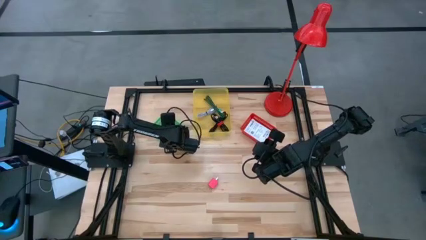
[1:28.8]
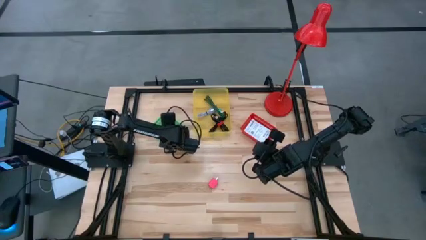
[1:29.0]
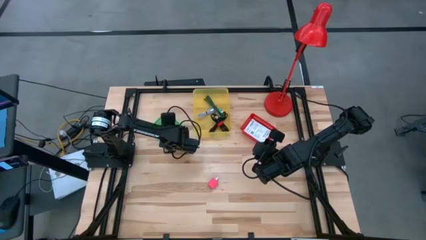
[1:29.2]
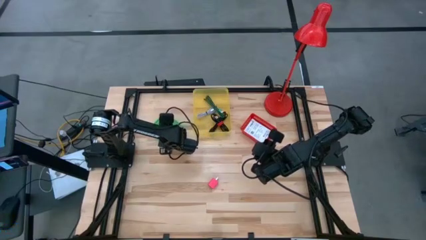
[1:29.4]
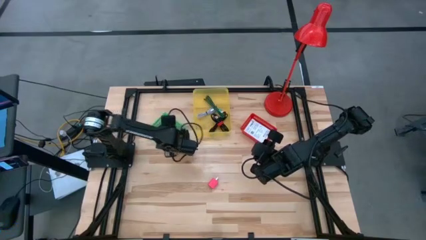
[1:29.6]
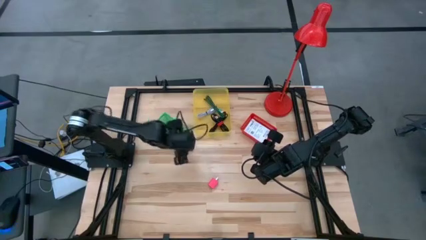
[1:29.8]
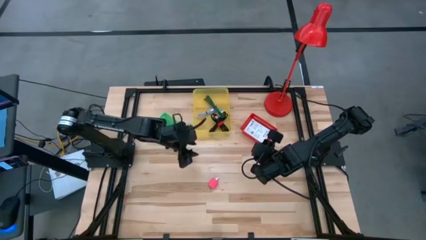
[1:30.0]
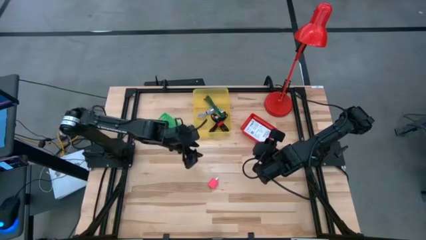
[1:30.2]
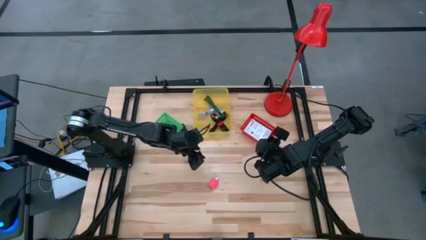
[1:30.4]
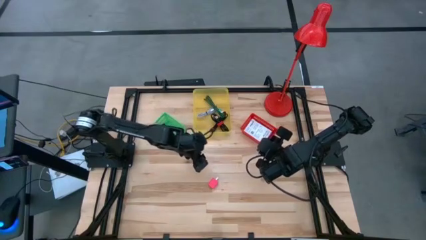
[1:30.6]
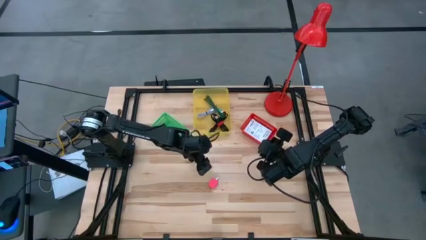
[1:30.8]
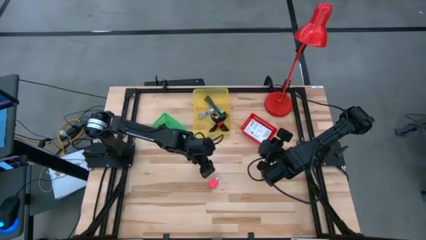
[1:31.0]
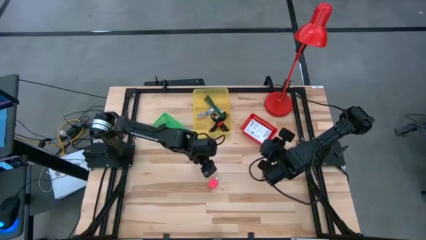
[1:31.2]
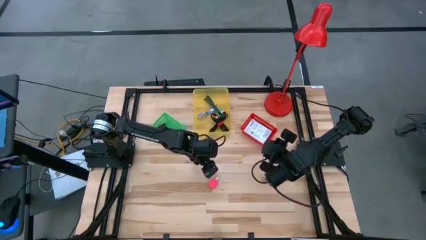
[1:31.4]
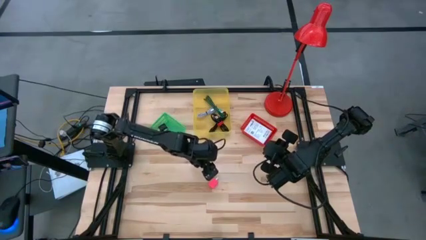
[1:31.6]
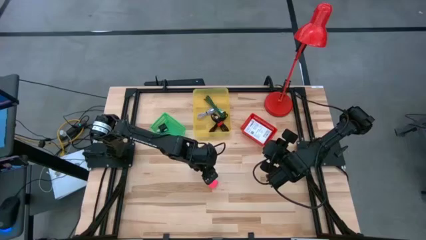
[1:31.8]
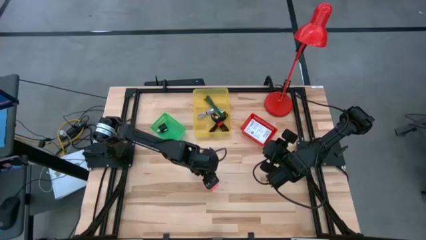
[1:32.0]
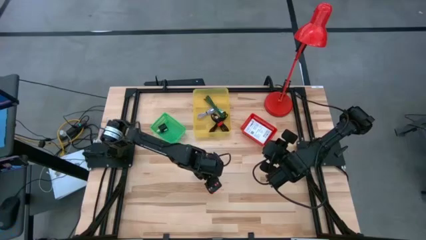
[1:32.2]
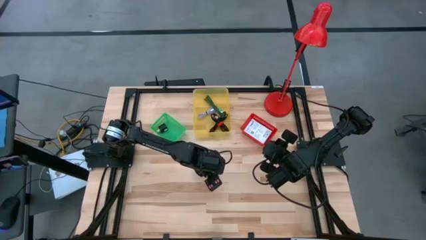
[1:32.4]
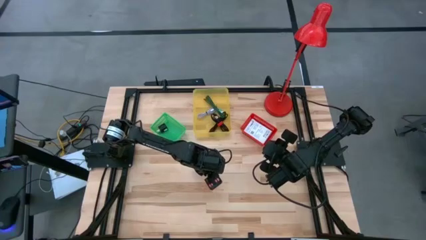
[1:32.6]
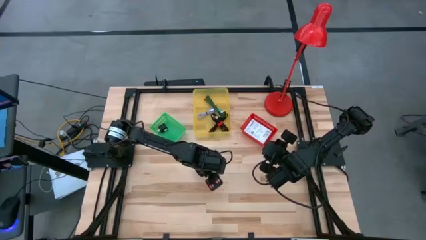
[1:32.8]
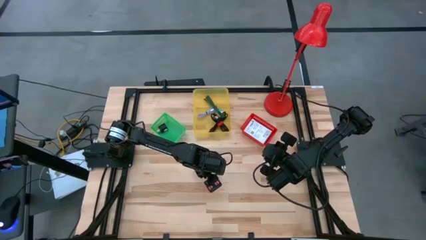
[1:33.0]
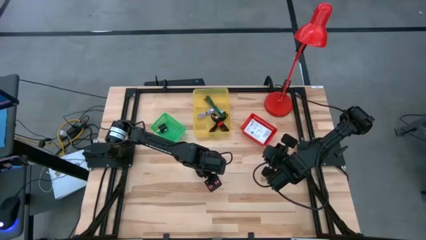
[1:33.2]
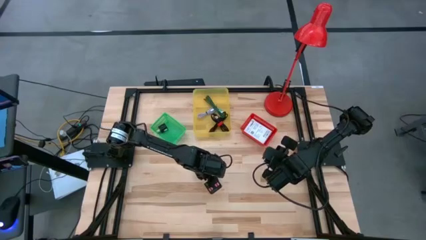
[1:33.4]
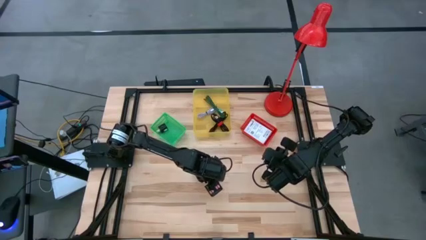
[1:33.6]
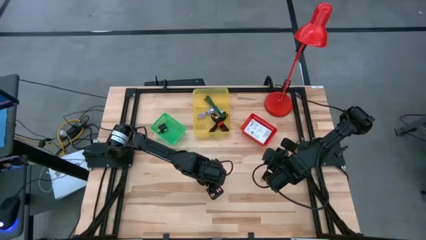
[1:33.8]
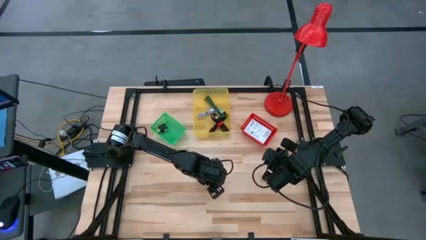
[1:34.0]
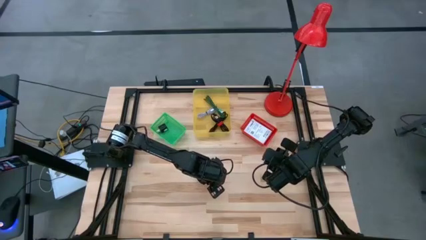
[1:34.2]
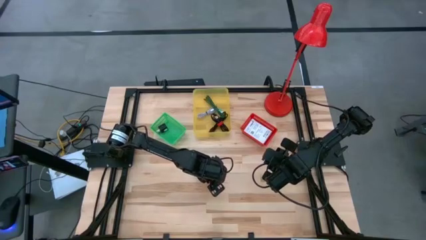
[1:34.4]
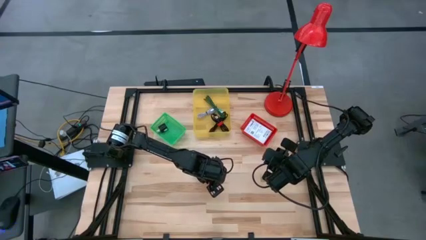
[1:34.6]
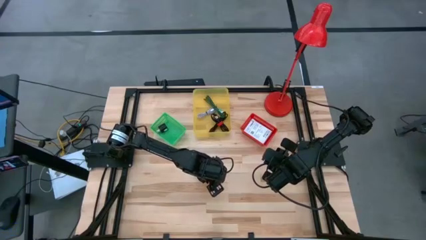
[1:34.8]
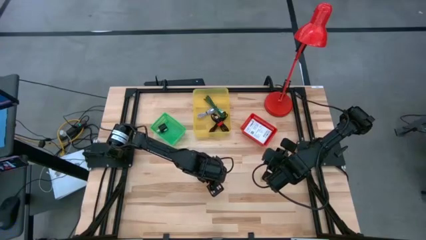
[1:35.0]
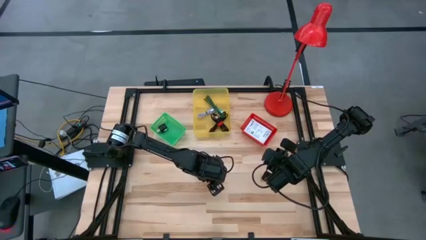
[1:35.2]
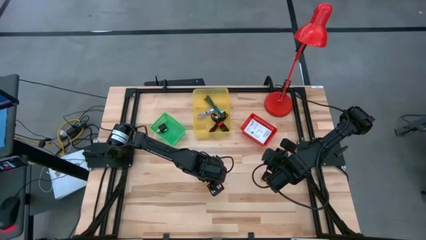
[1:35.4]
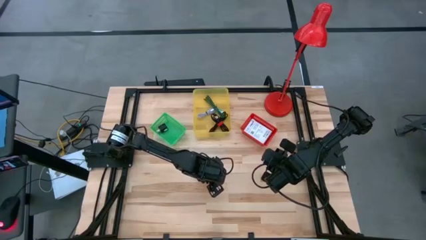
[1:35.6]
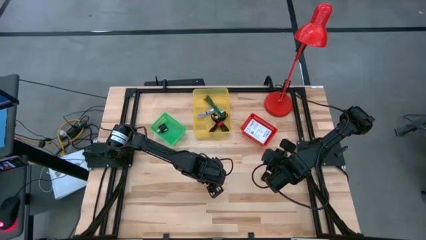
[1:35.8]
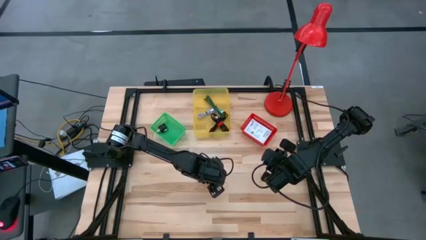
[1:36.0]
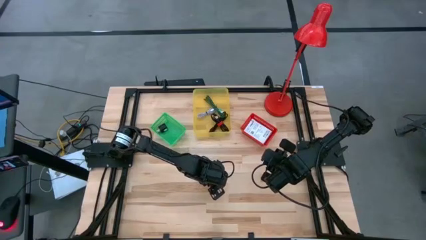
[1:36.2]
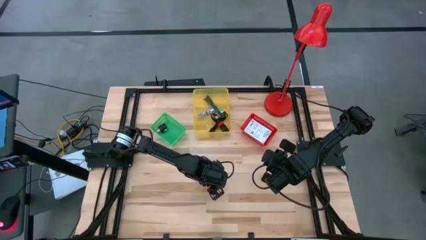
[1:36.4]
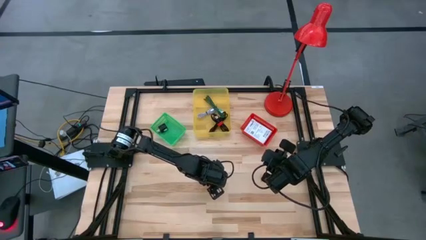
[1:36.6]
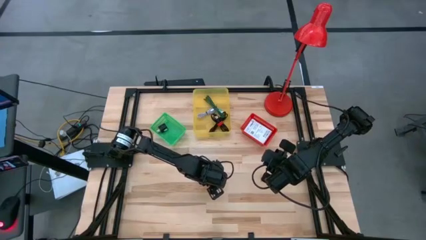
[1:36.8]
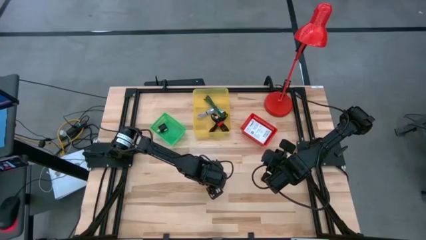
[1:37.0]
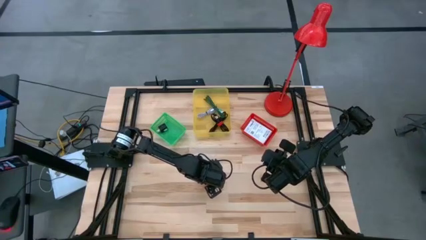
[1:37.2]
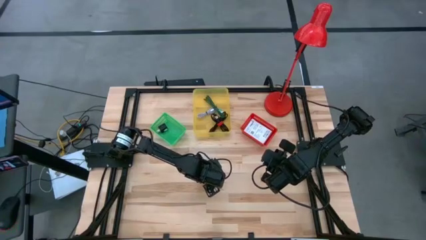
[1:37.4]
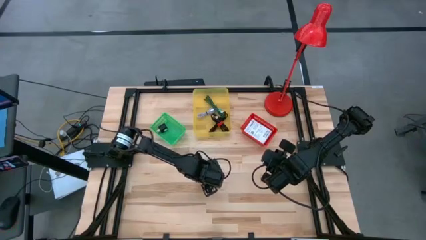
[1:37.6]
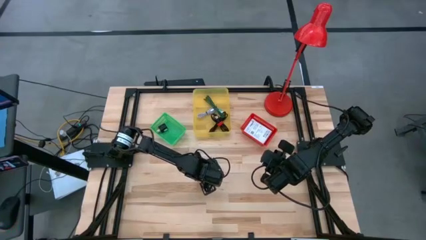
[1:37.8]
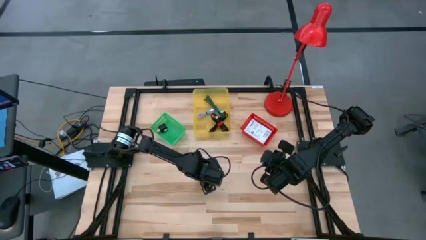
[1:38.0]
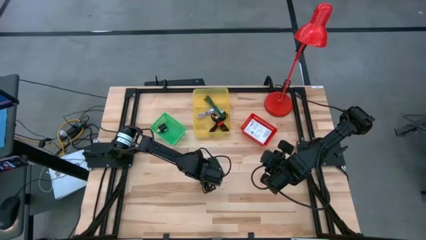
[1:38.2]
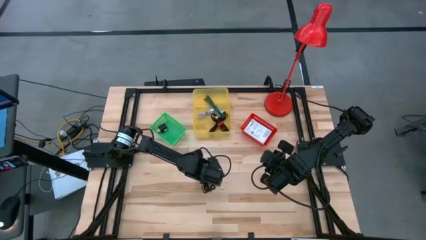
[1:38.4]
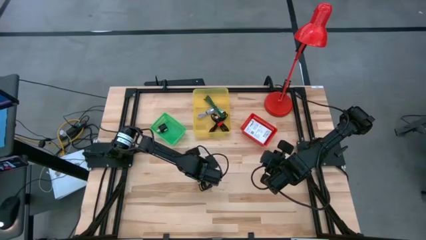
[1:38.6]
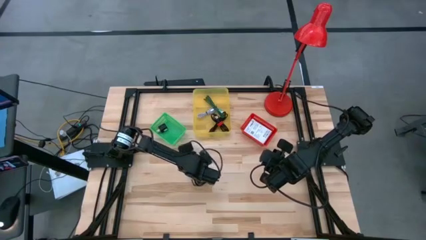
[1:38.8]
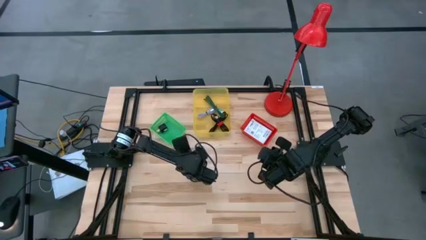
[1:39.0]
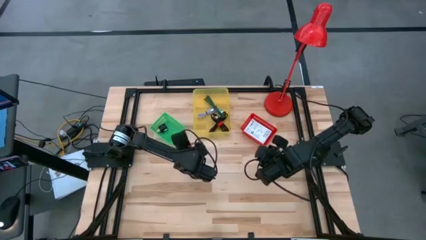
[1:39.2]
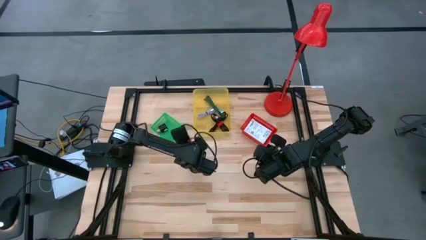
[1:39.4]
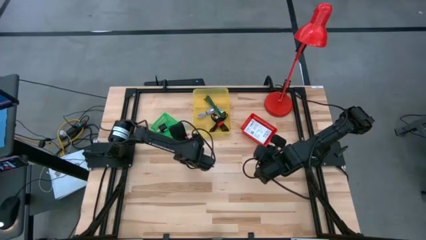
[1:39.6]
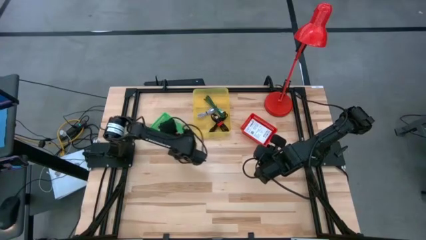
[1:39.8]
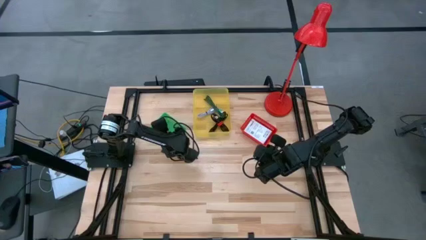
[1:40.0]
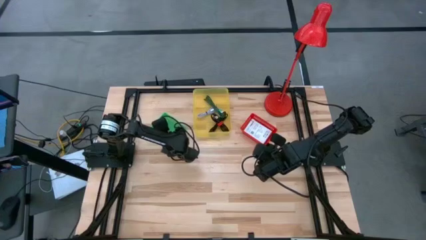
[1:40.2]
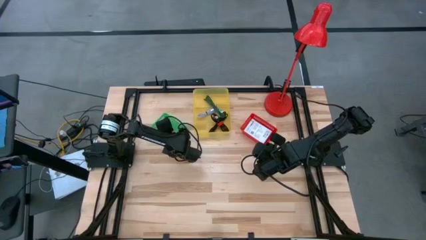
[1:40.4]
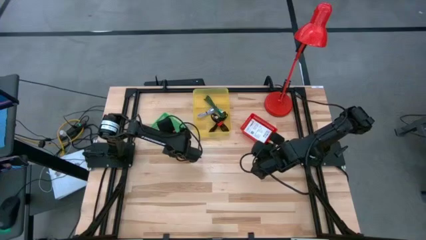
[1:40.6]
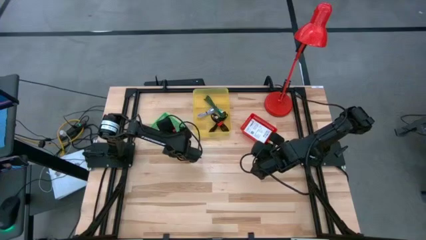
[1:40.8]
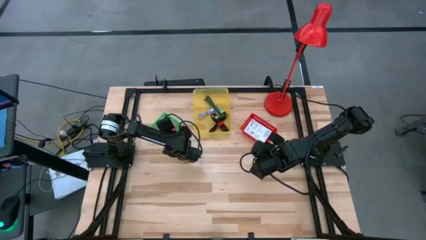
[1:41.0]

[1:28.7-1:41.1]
Task: Pick and place items into bin
Put the pink charger adapter into the green bin

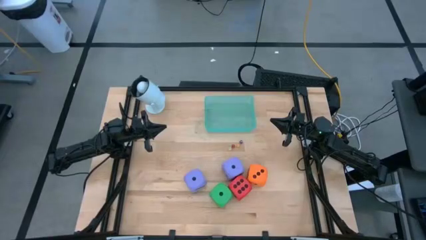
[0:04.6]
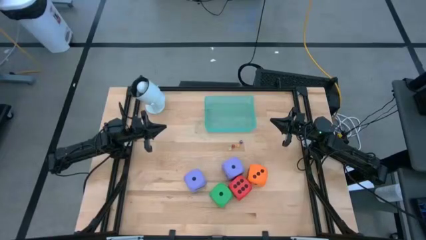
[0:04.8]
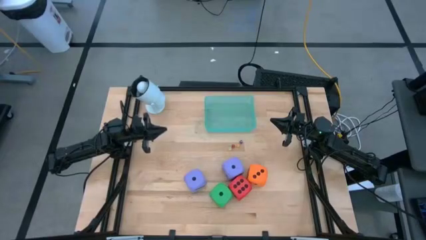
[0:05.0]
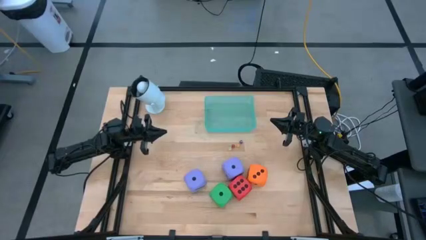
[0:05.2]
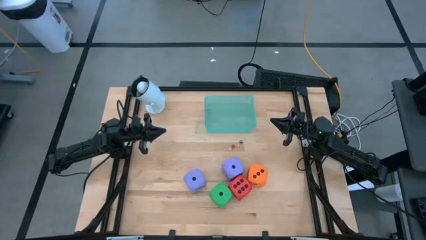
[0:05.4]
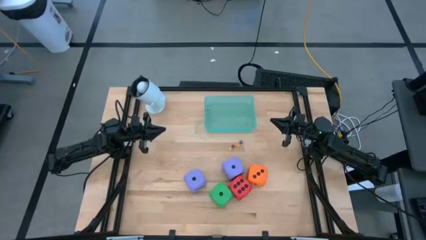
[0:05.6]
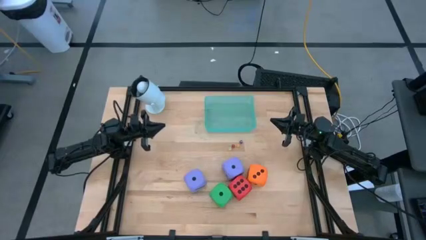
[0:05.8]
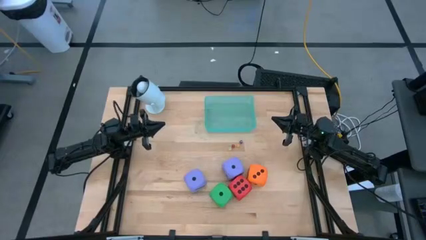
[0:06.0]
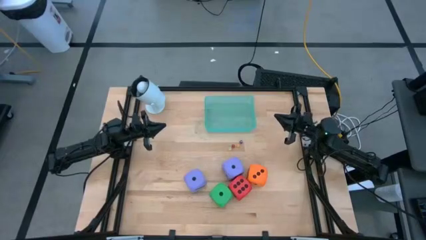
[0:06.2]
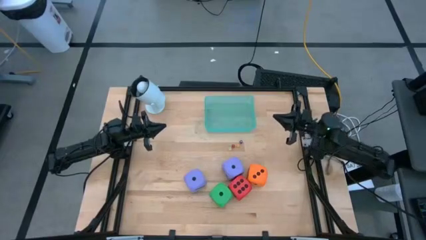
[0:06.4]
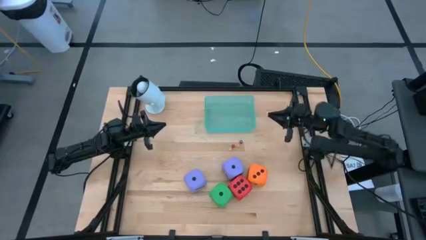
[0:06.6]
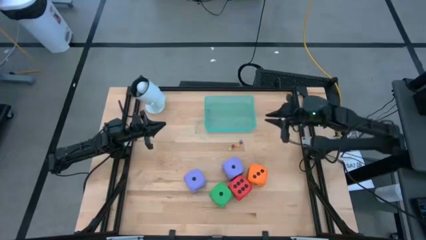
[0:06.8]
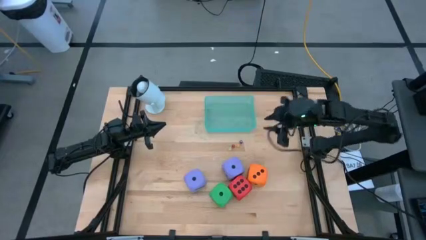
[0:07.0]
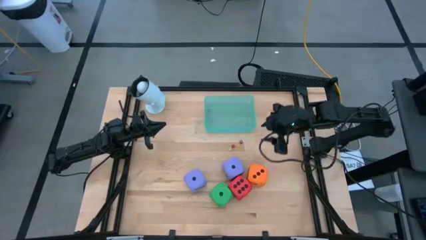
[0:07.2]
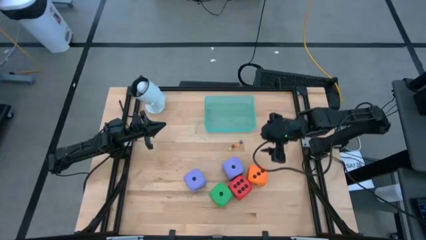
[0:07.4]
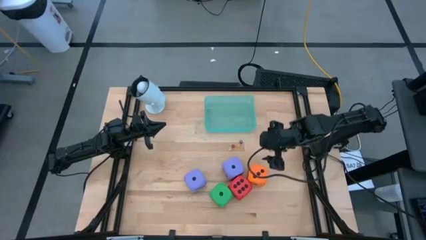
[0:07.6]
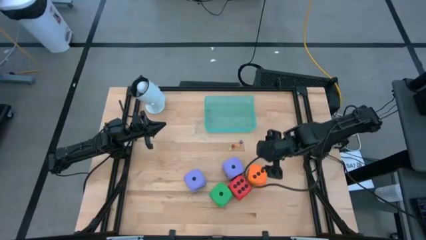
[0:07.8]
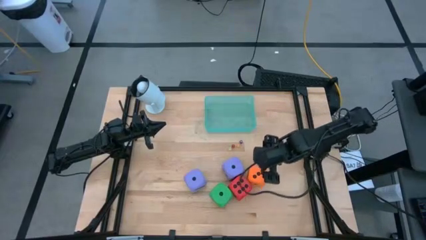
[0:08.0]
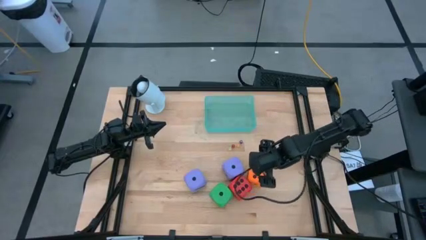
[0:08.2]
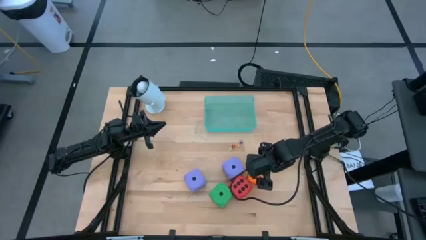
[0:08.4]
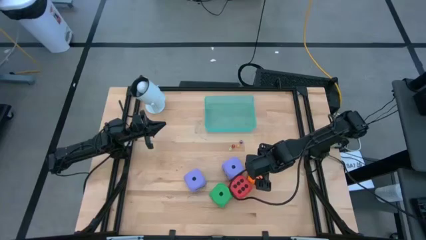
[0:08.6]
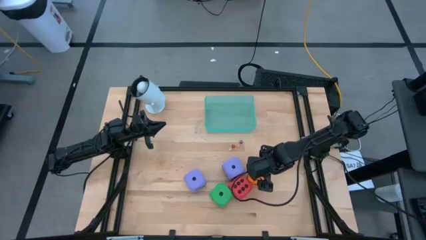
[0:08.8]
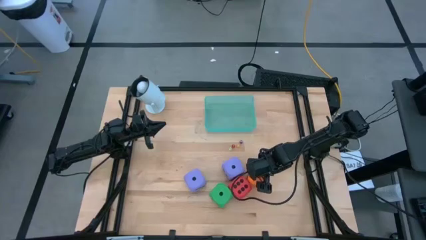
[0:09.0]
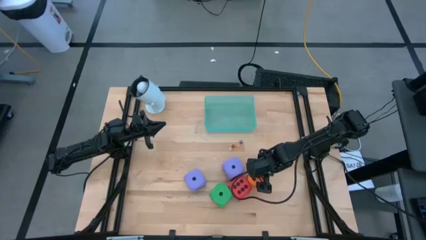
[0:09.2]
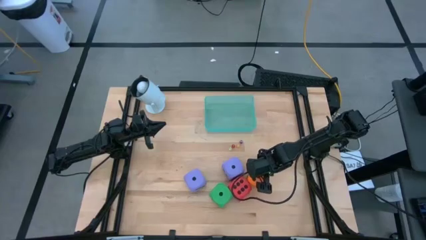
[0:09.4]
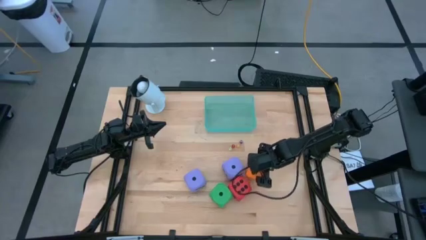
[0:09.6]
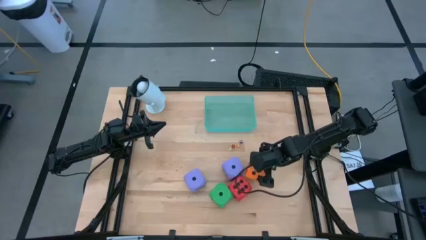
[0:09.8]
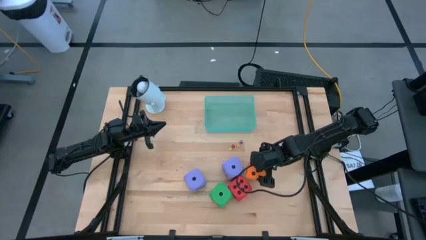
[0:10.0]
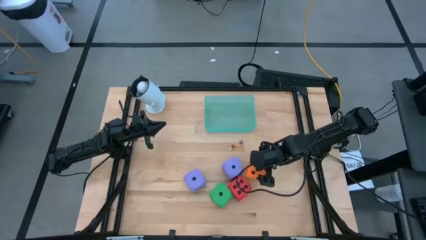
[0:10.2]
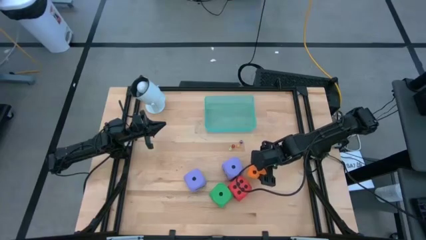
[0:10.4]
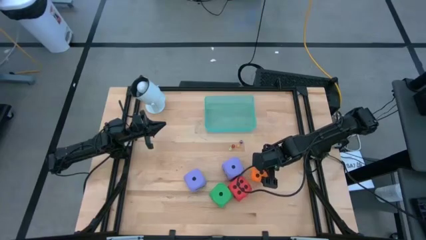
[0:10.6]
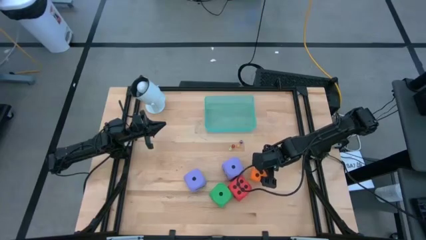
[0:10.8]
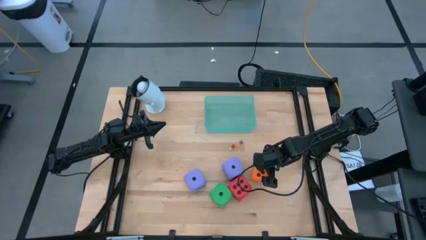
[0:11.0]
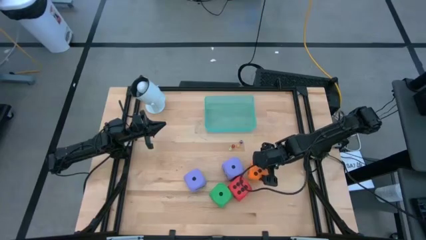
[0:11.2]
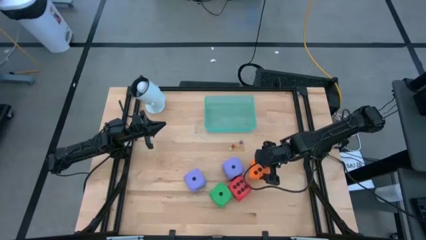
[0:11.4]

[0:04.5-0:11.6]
Task: Pick & Place Dice
Put the big orange dice into the transparent blue bin
